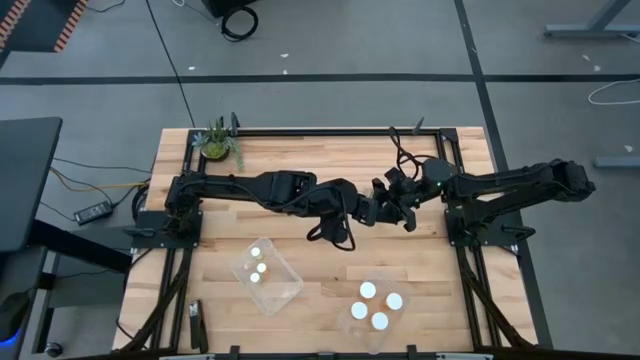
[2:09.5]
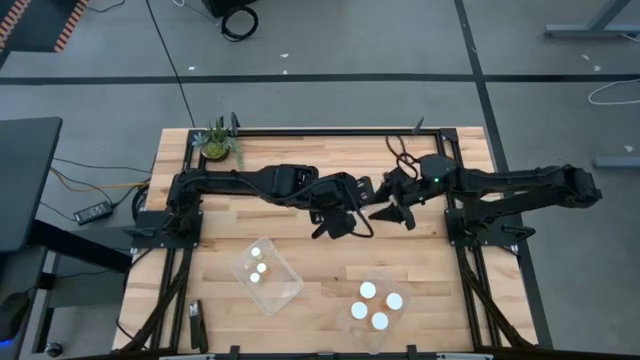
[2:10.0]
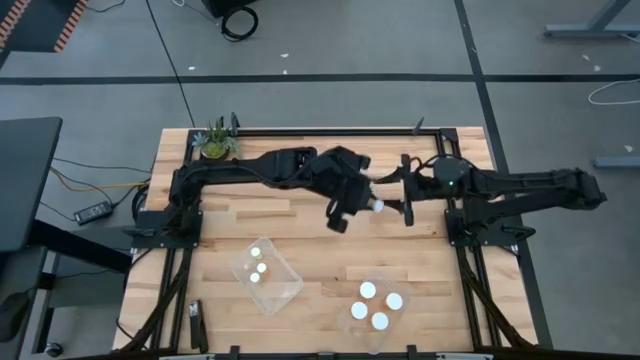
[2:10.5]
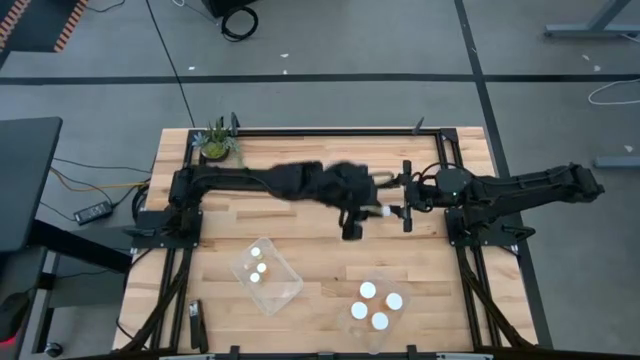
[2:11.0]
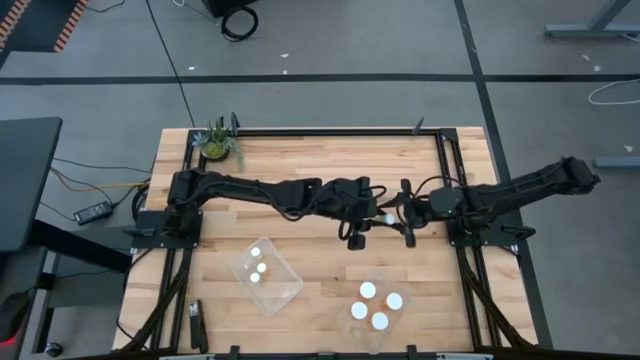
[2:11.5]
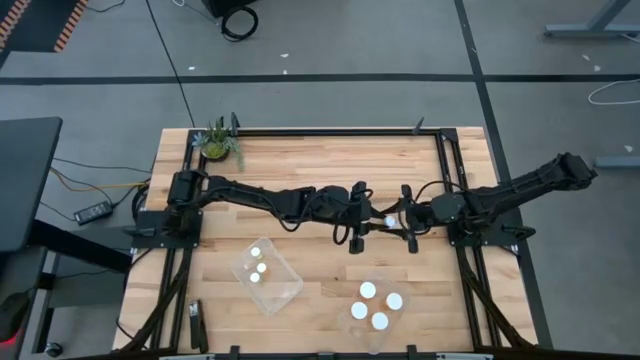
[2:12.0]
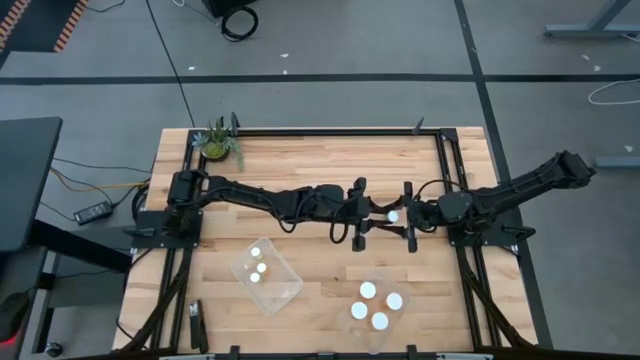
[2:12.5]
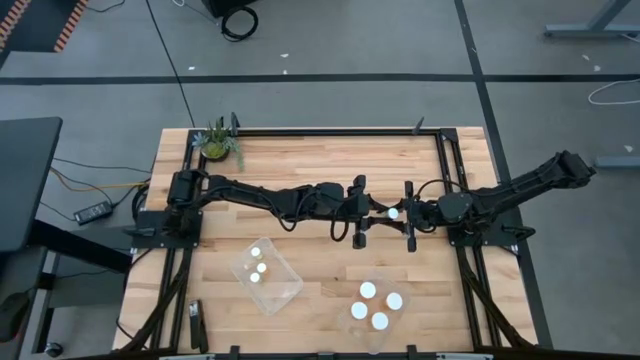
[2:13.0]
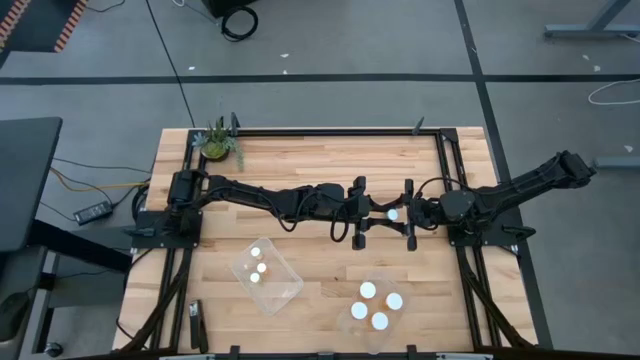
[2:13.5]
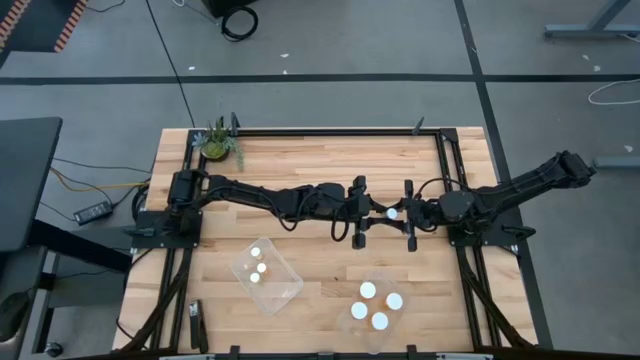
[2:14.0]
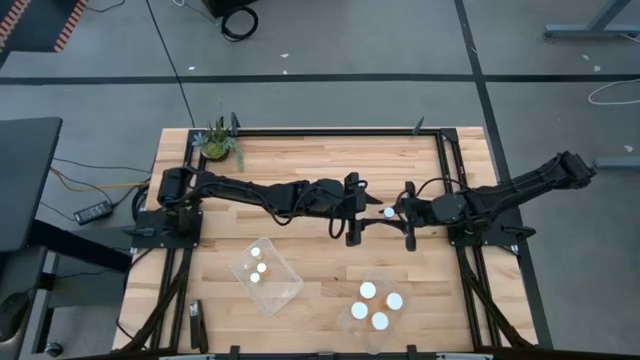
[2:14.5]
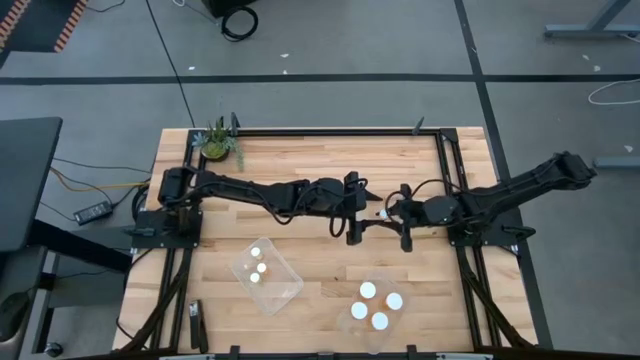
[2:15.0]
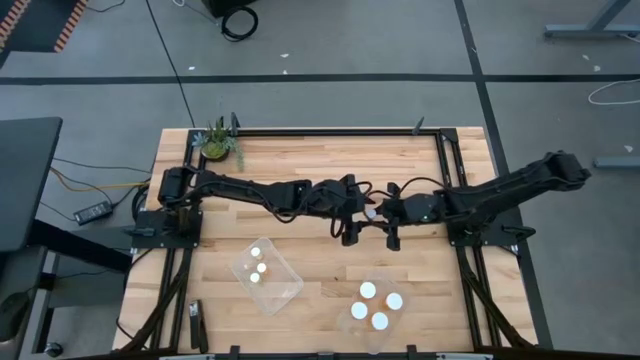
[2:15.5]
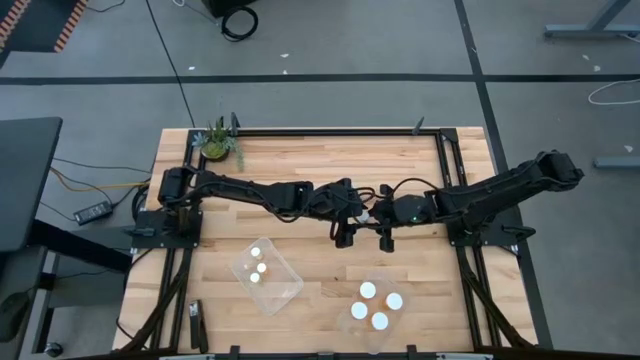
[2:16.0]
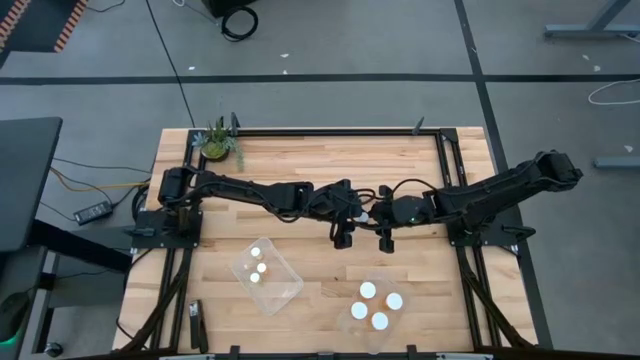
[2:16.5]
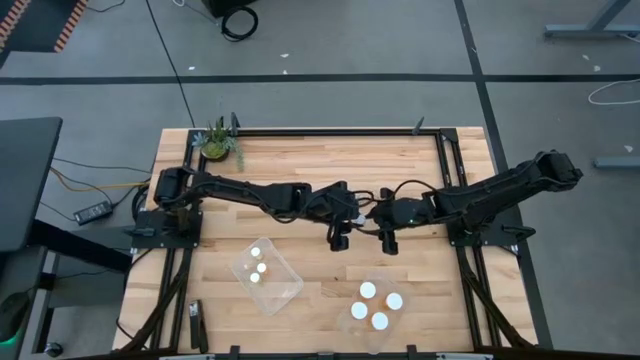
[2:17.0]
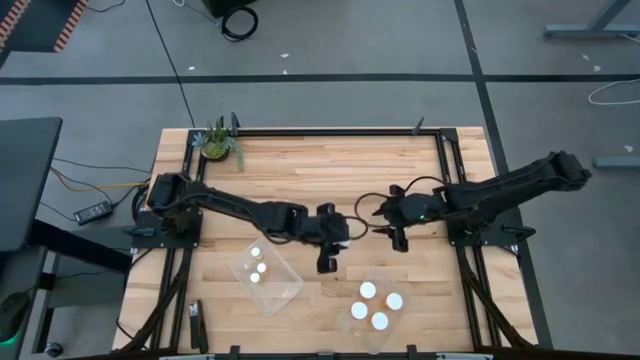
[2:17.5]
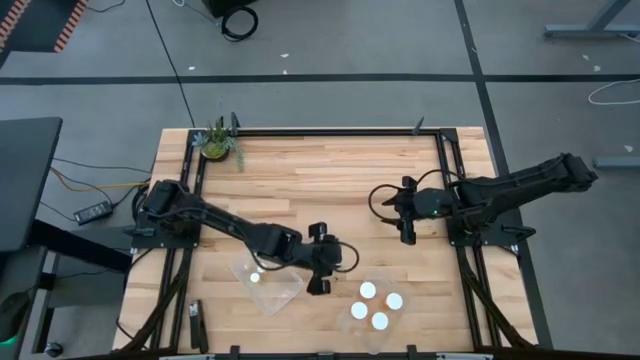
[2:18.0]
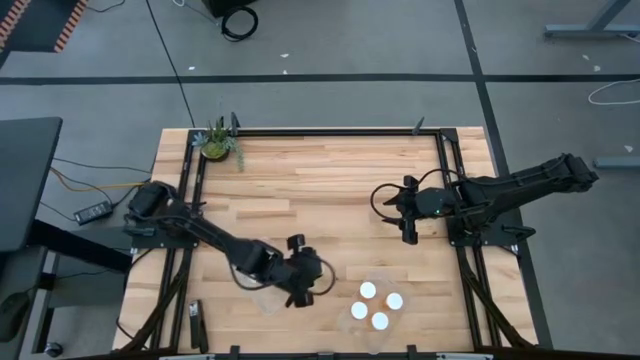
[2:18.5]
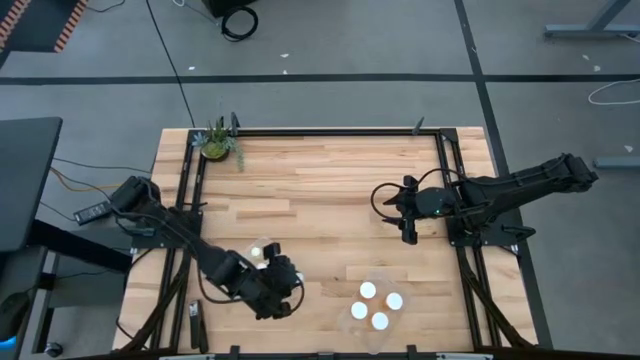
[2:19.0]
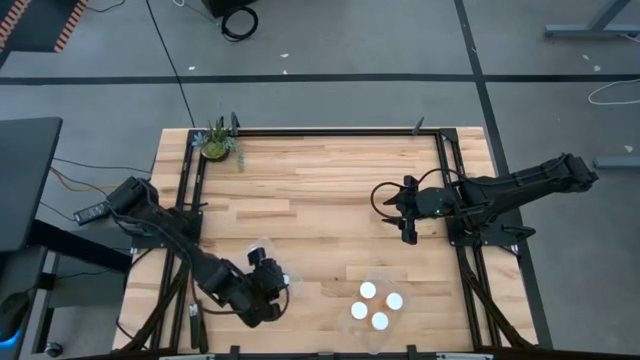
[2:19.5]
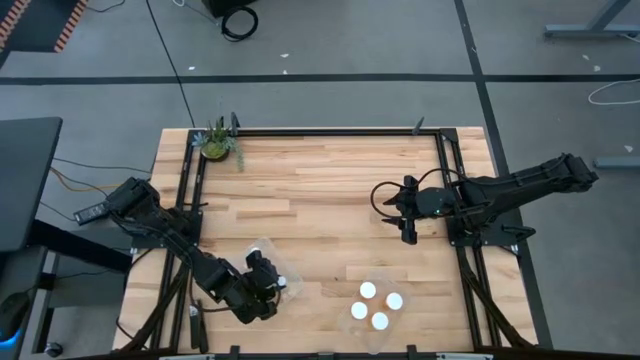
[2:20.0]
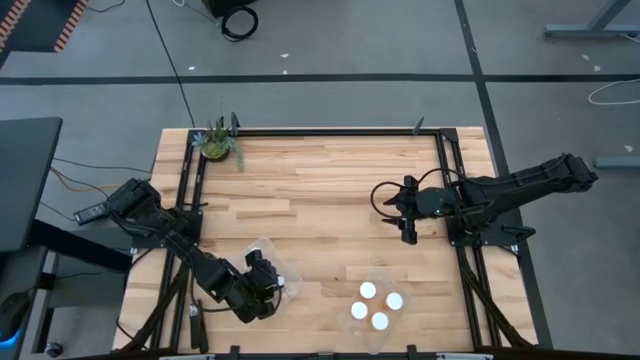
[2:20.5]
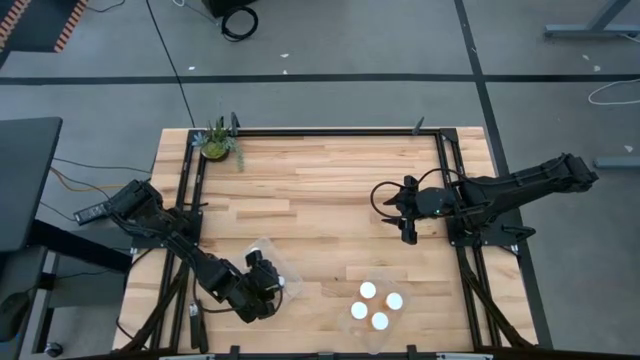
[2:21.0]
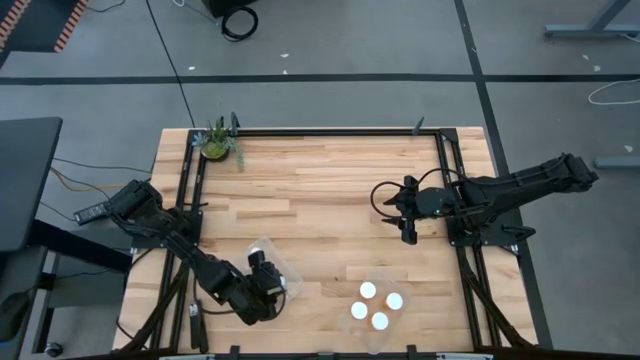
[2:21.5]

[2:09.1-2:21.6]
Task: Pick and place medicine bottles into bin by pill shape (circle, oval)
Adjust the small yellow pill bottle

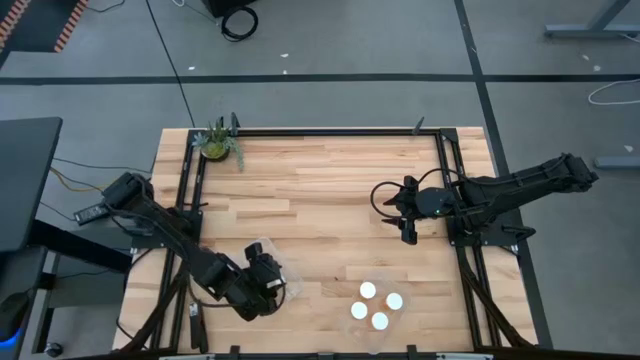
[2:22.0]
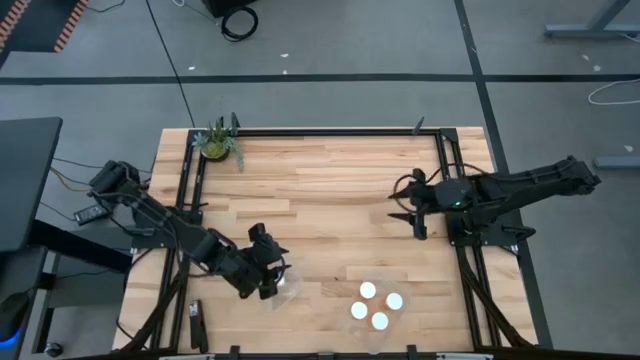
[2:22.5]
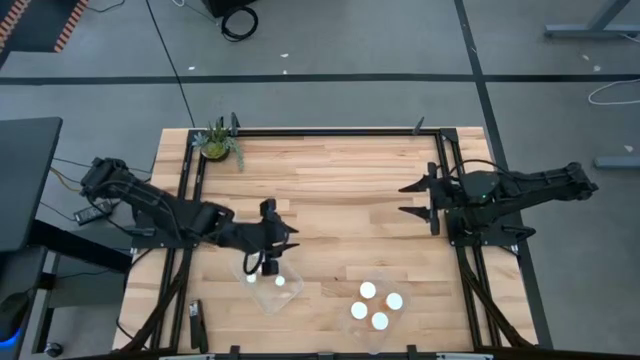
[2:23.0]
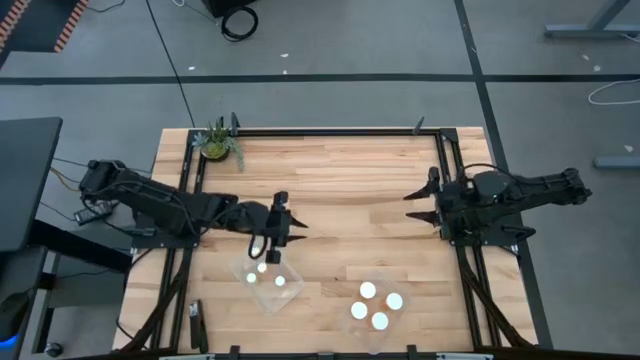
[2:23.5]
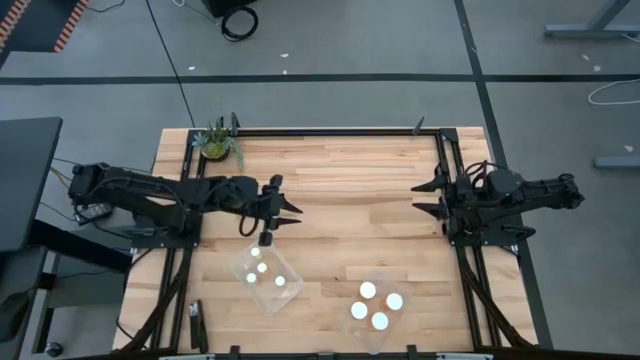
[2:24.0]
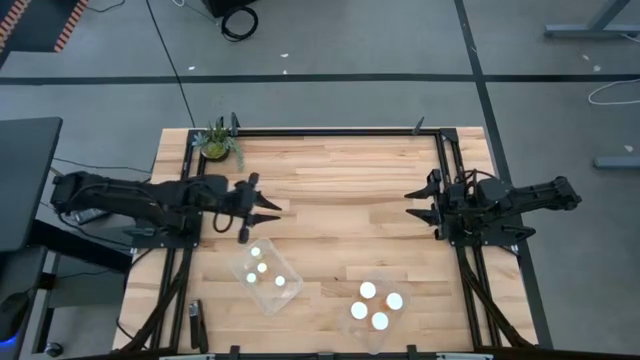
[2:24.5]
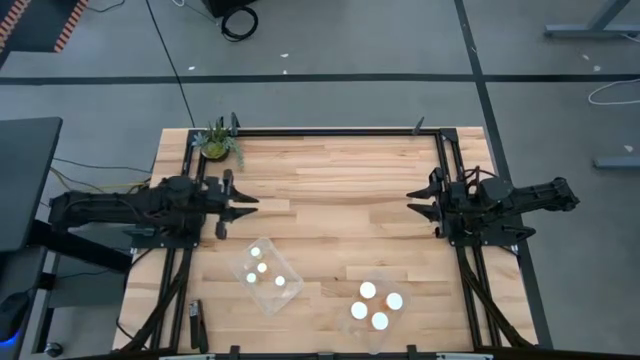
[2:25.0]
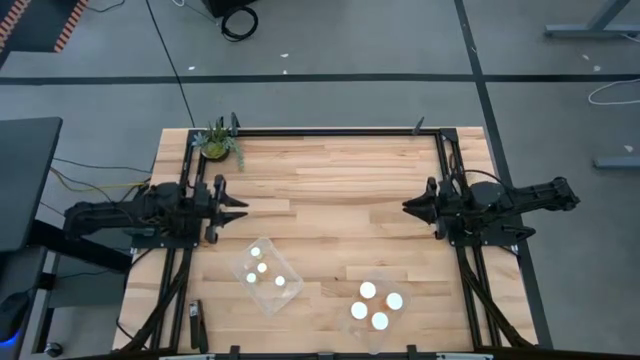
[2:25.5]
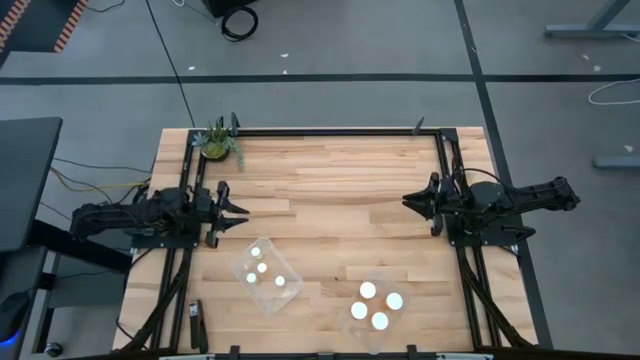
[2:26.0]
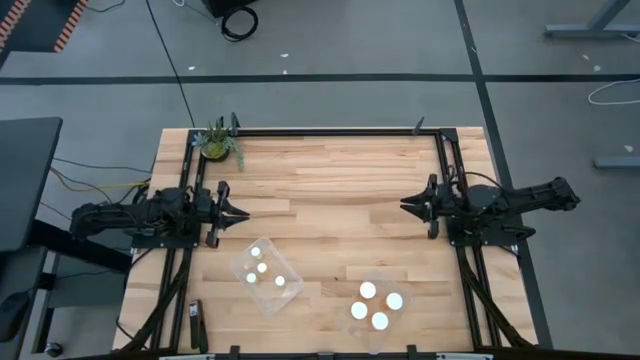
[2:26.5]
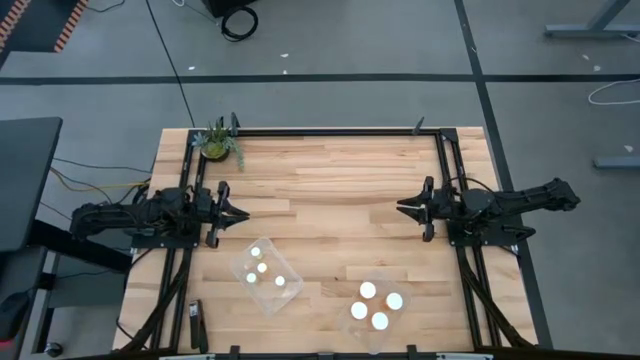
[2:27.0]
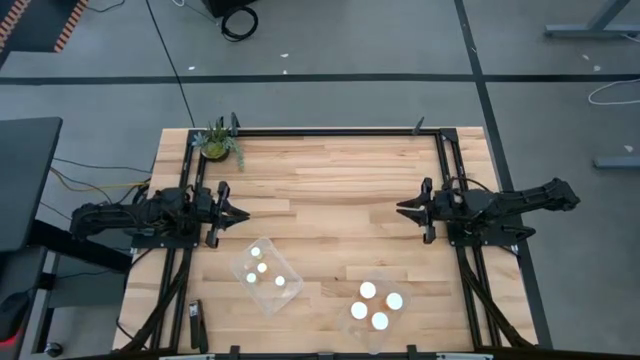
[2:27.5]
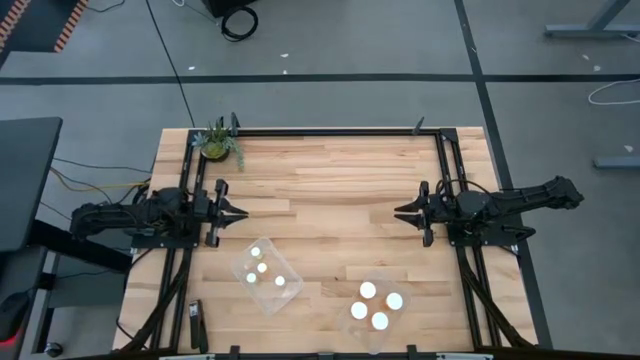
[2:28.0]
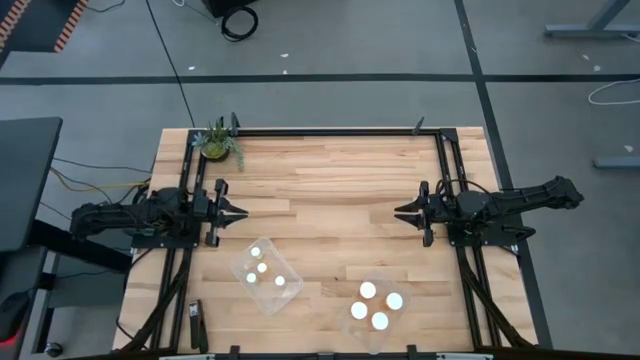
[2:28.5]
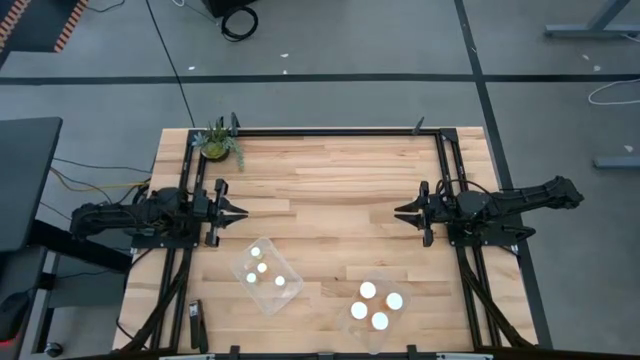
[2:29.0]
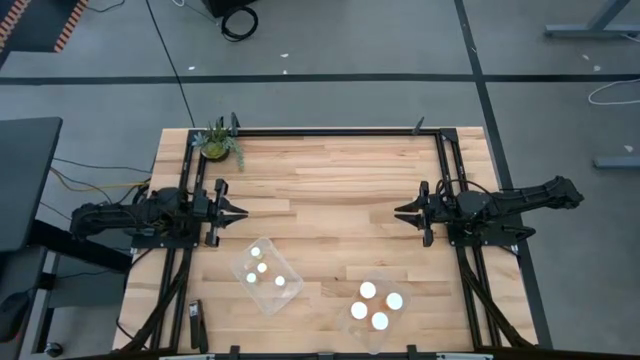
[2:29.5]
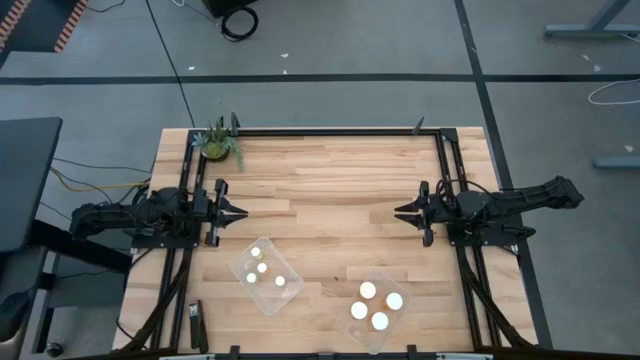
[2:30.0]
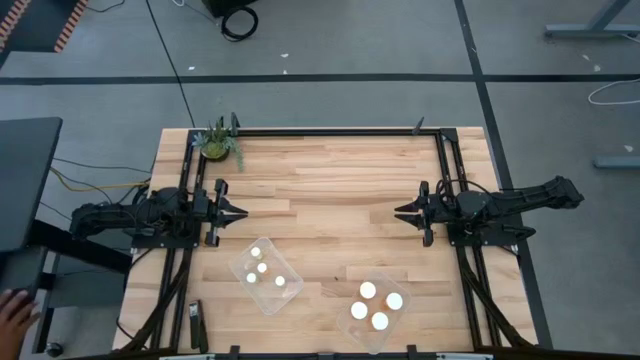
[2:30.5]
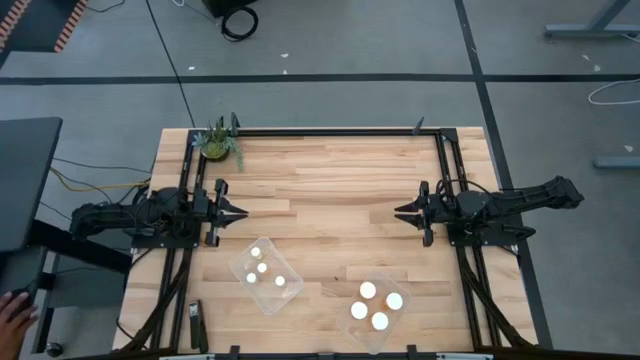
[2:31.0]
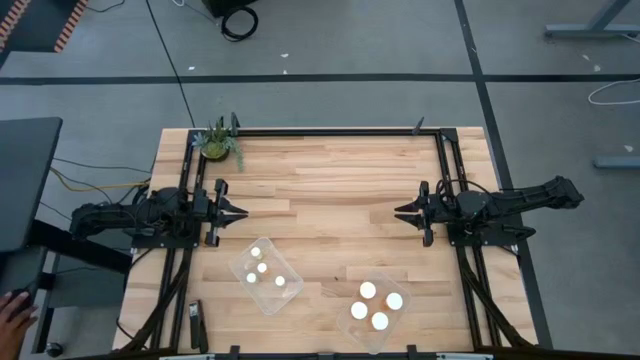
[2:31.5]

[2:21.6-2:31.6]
Return to Home Position

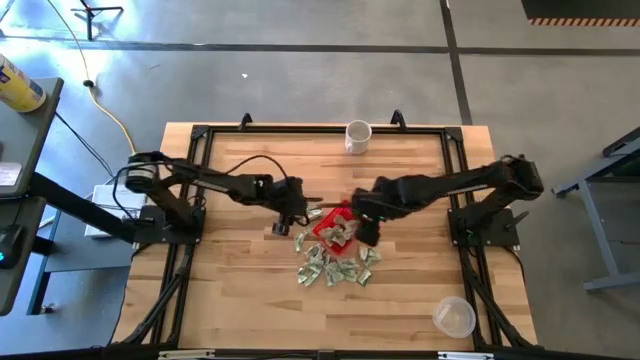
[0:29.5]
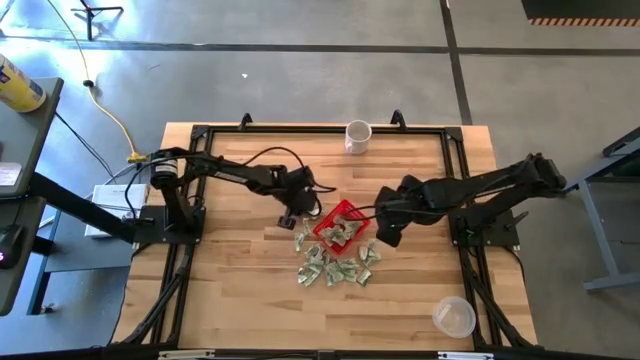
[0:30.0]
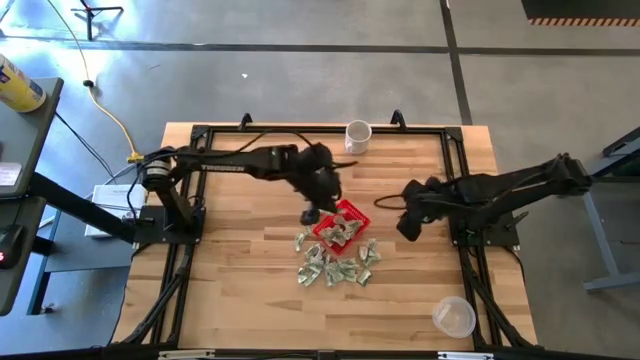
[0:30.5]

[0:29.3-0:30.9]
Task: Pick and place items into bin
Put the white stevia packet into the red bin
